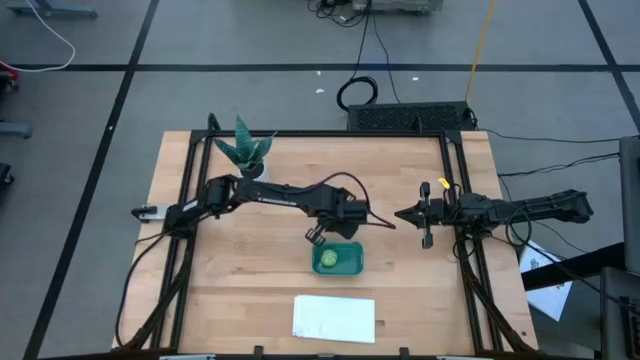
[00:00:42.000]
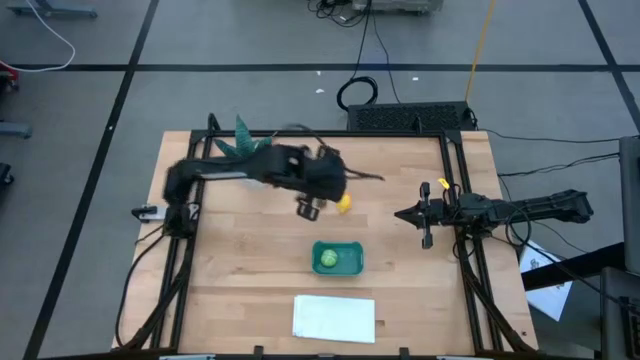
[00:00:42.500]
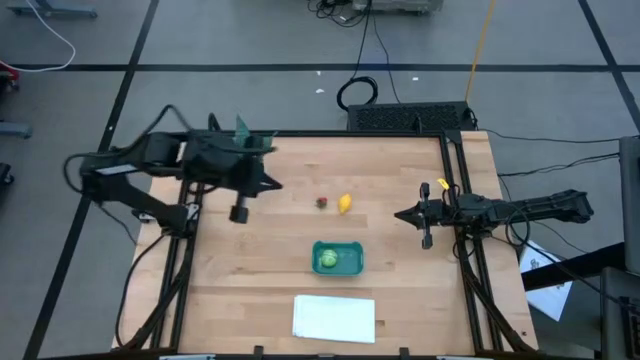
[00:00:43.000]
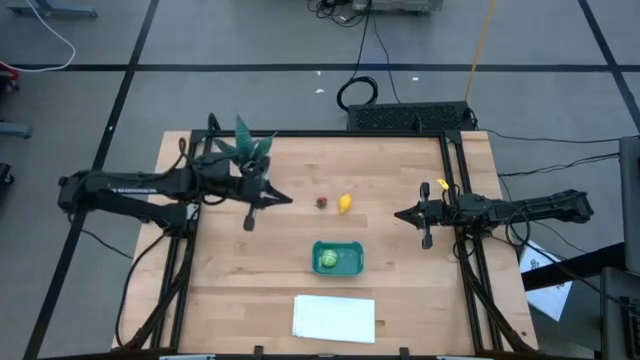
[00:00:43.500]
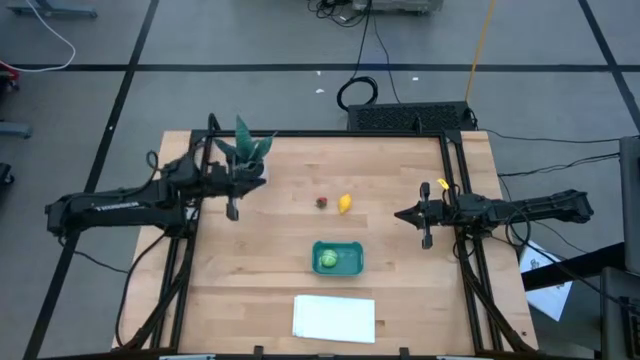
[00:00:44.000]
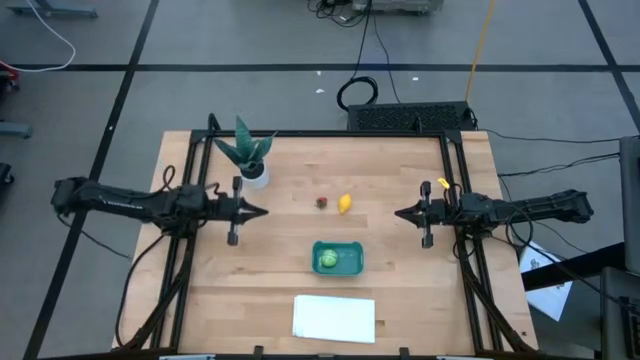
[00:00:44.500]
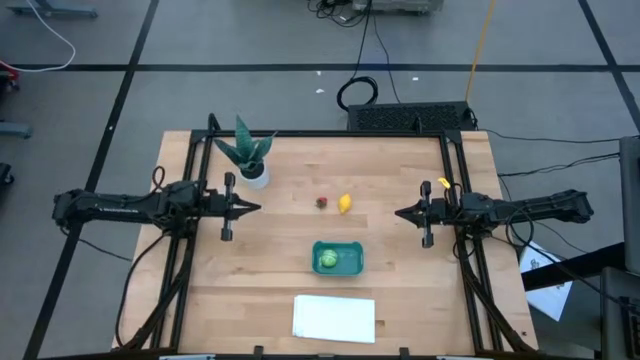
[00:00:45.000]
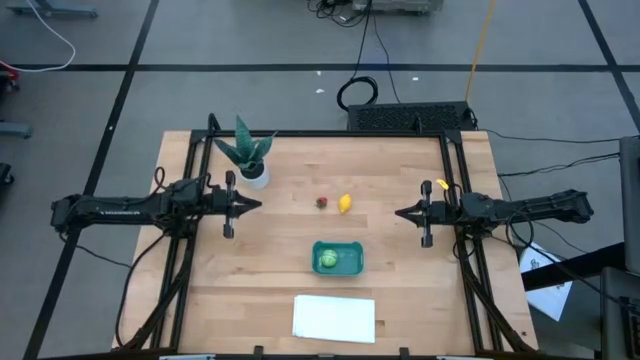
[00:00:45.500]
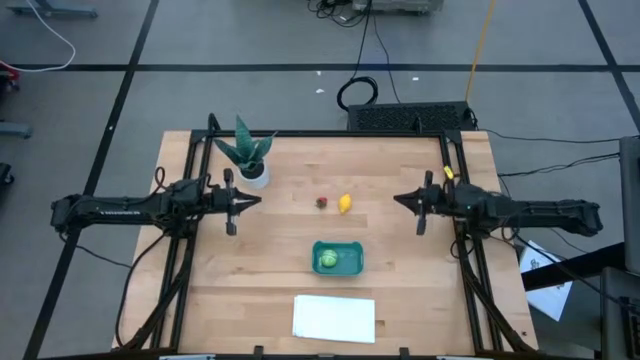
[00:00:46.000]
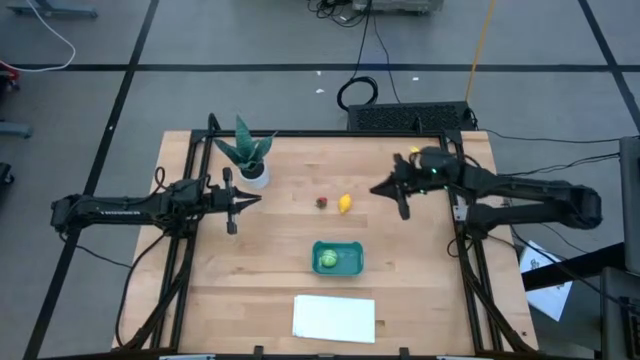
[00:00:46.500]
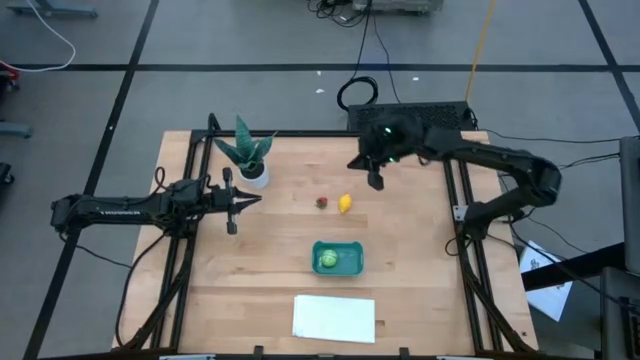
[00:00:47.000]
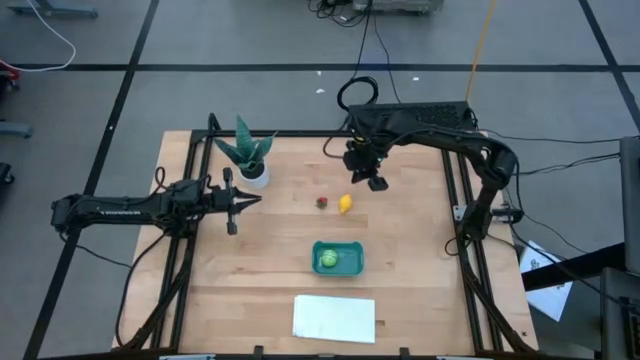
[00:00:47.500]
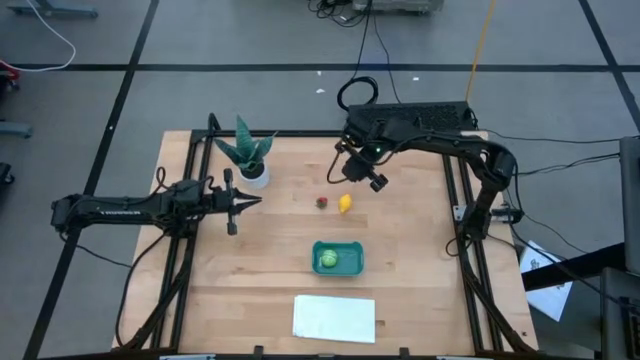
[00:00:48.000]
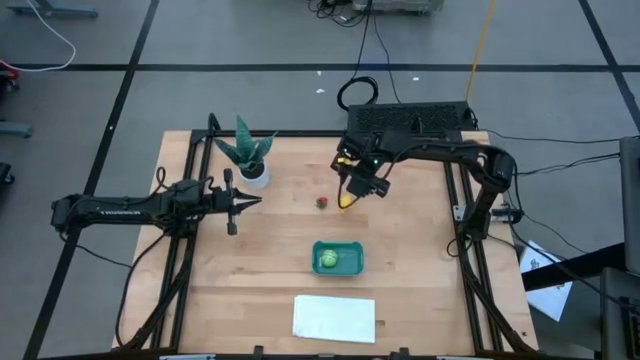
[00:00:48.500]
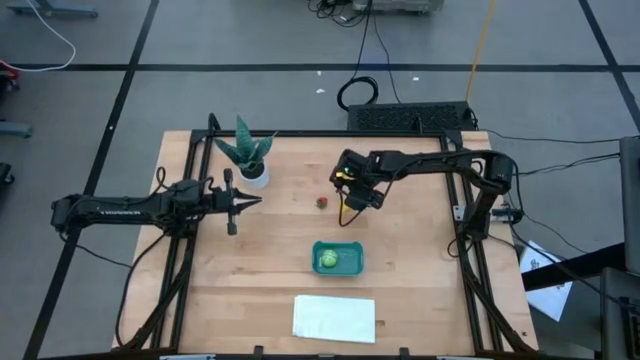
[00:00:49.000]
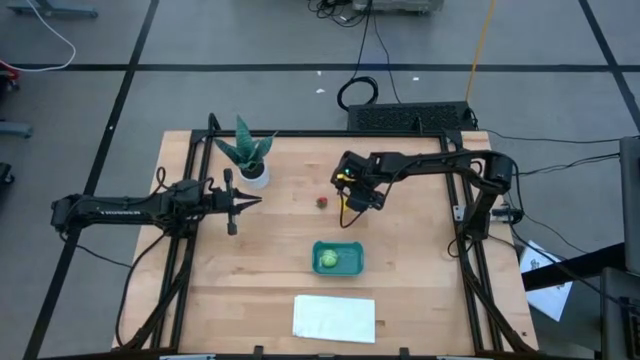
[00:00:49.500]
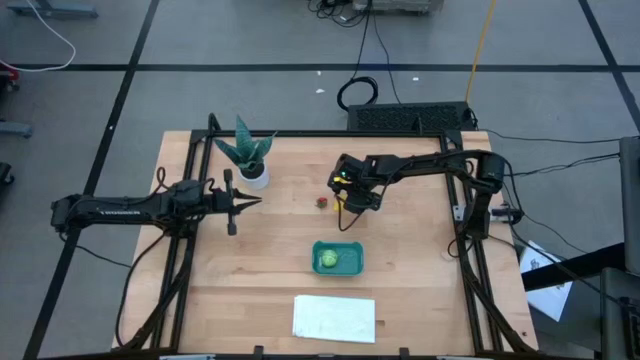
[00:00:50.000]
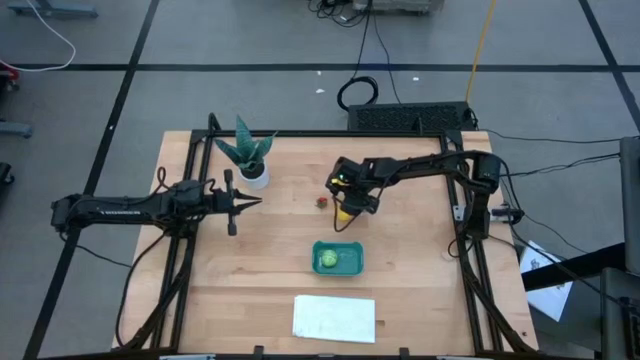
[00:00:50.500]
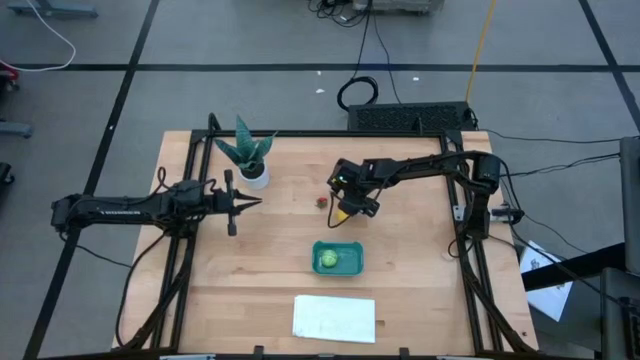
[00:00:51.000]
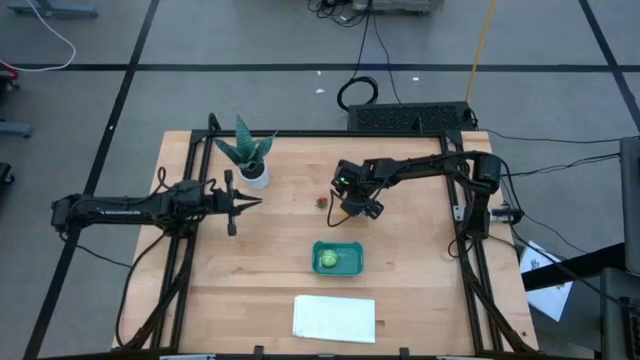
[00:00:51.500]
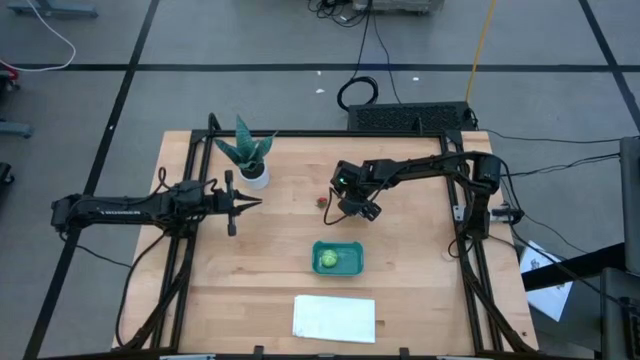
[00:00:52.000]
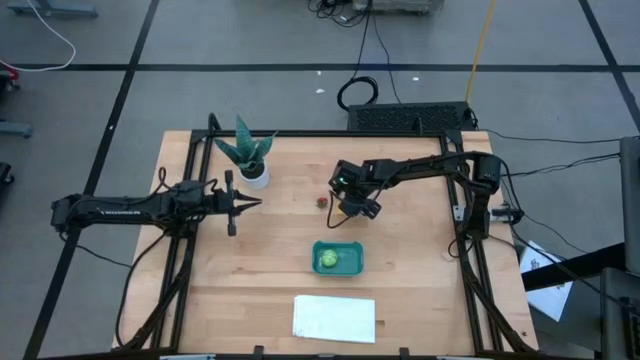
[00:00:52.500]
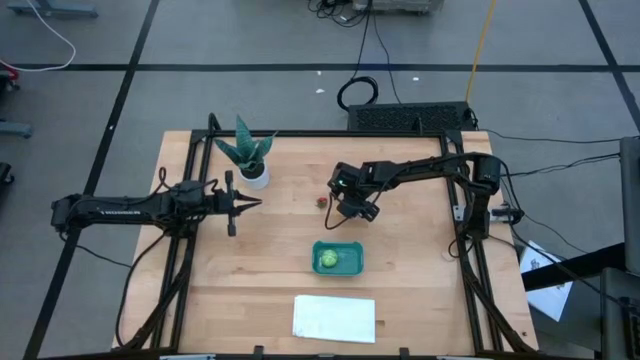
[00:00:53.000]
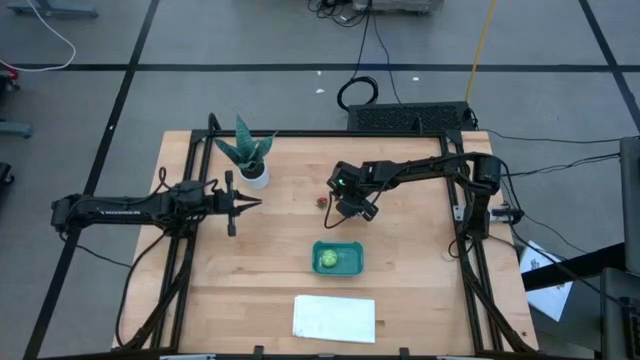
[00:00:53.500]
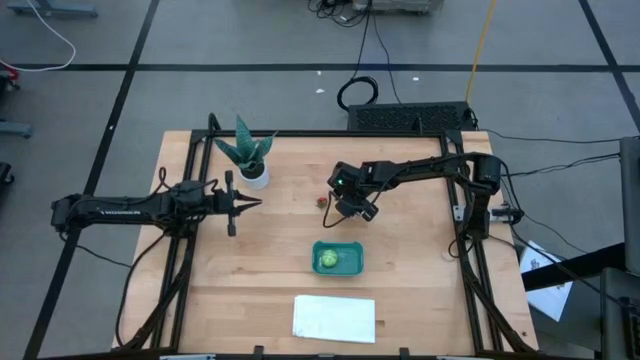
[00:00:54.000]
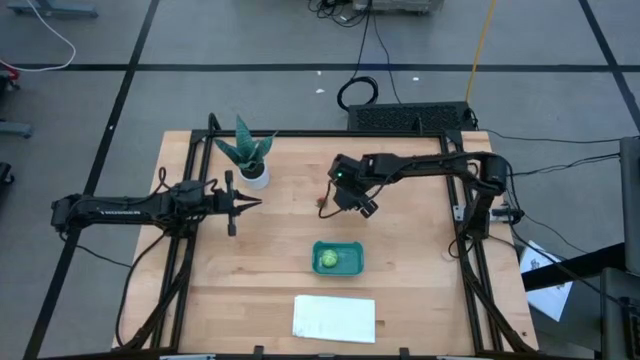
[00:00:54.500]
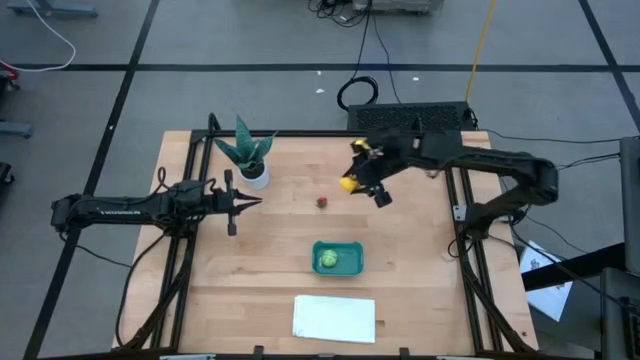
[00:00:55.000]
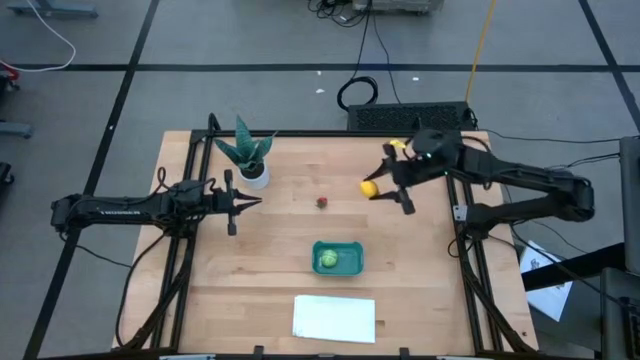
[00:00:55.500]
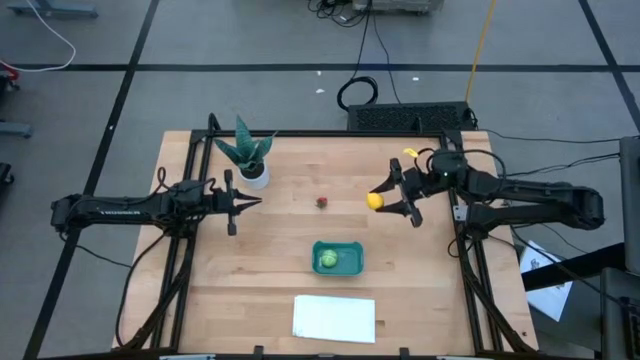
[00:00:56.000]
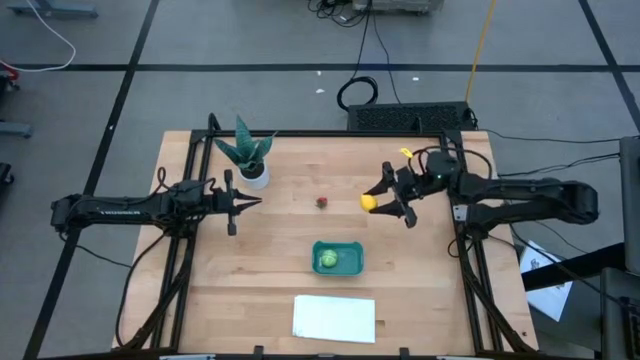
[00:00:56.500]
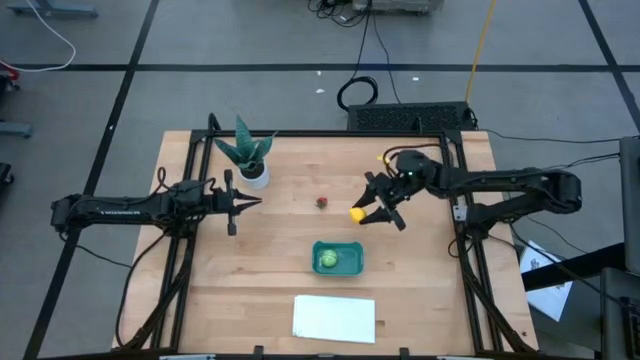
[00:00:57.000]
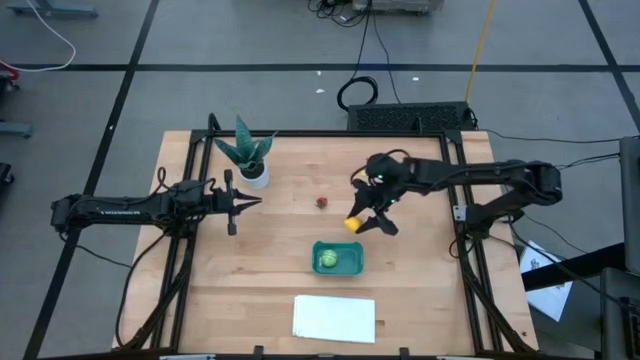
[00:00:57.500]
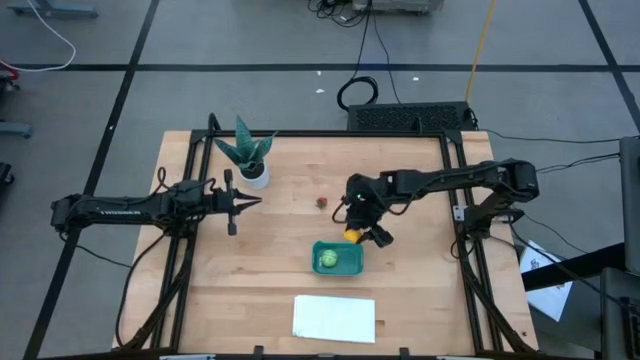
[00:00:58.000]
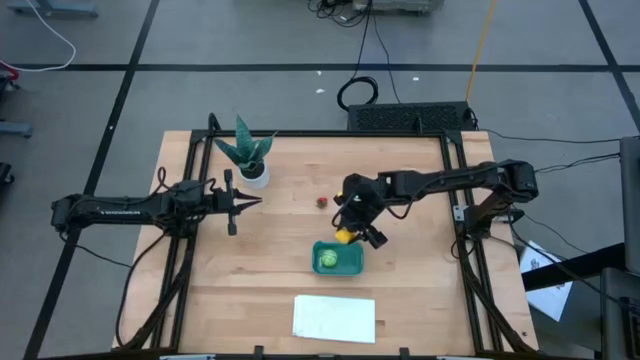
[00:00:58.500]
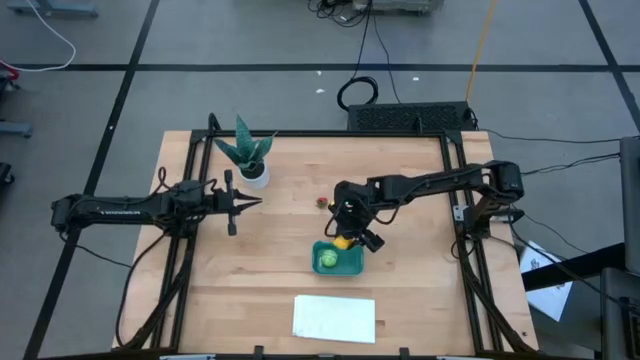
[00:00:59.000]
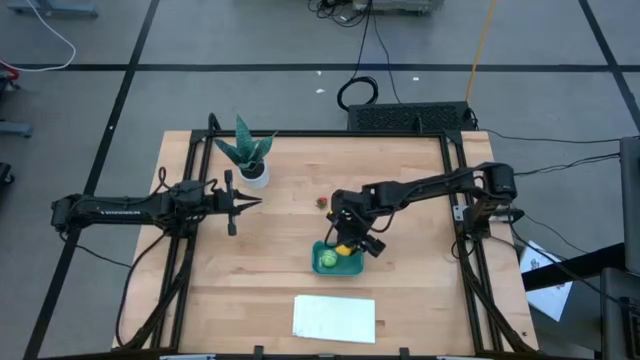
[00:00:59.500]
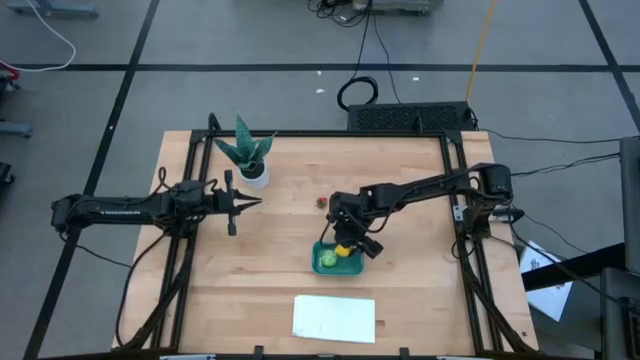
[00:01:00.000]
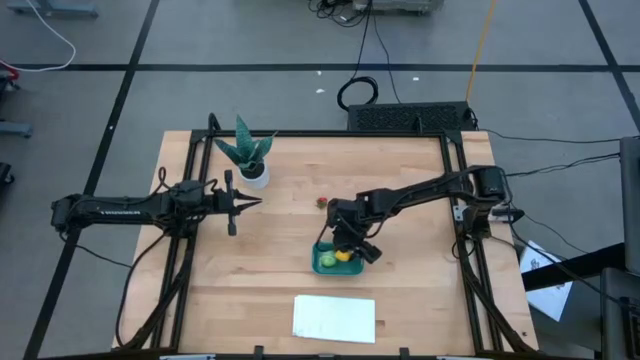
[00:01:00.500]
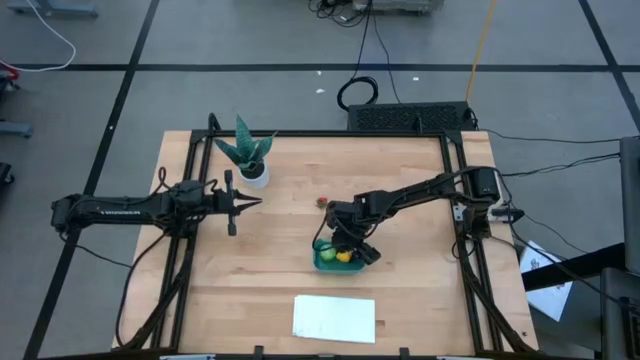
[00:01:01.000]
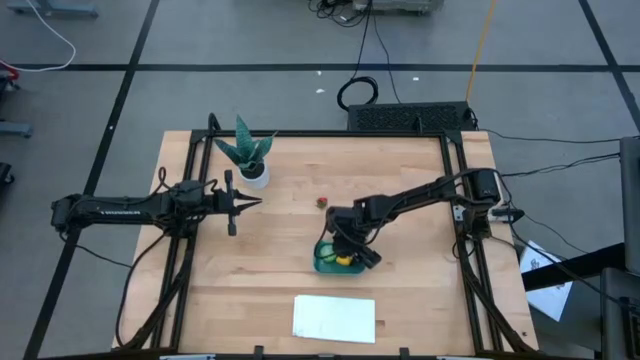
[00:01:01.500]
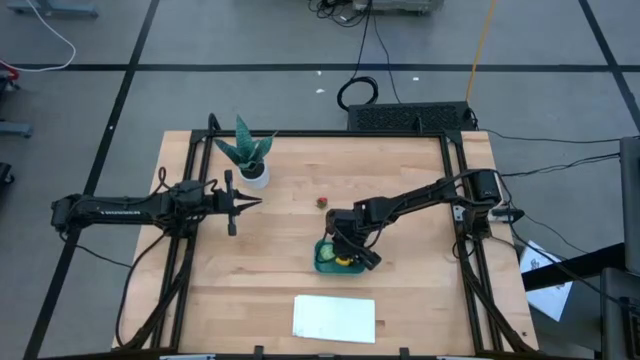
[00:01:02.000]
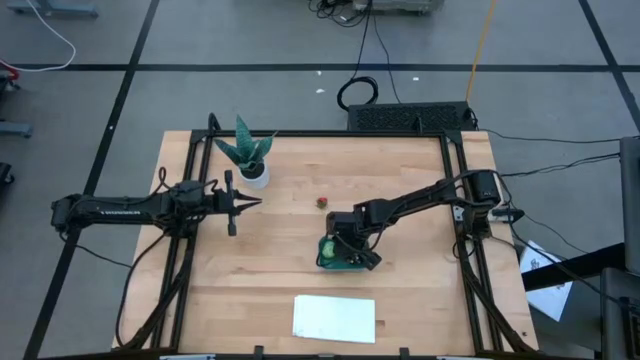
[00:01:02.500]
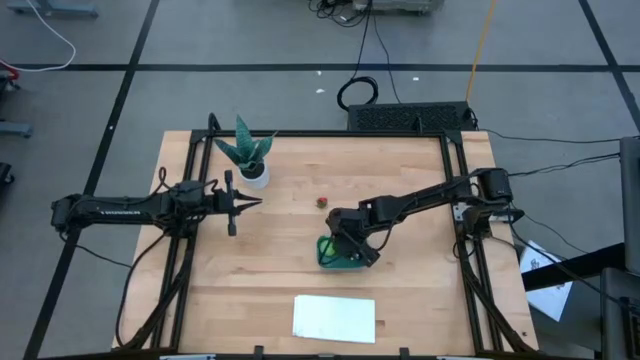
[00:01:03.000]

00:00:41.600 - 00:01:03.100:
Task: Pick and placing Produce into tupperware
Put the lemon into the blue bin

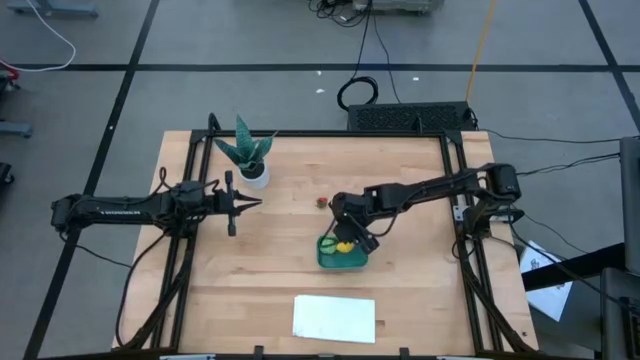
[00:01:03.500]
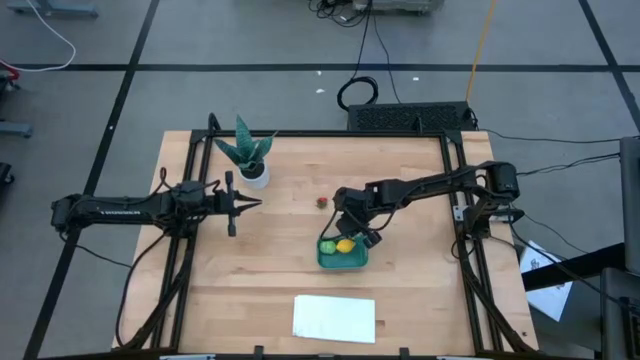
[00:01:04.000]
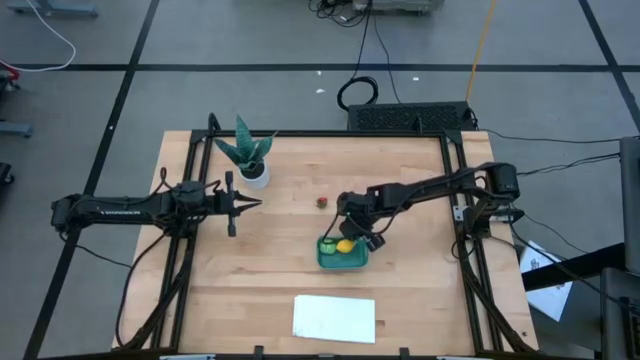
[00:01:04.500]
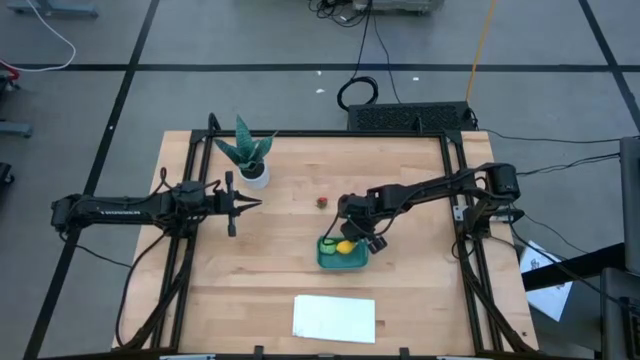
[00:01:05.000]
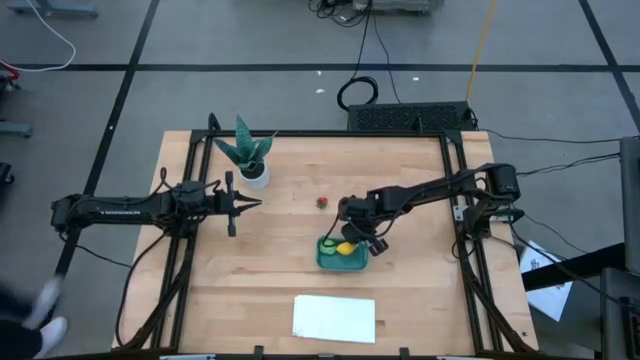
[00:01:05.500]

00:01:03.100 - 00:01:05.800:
Adjust the blue bin
